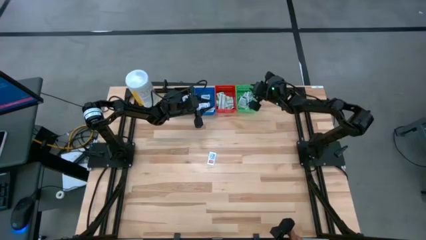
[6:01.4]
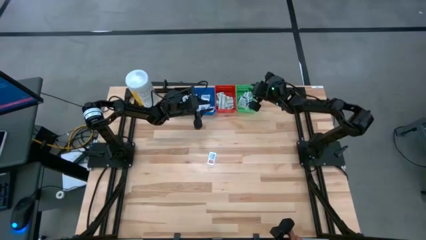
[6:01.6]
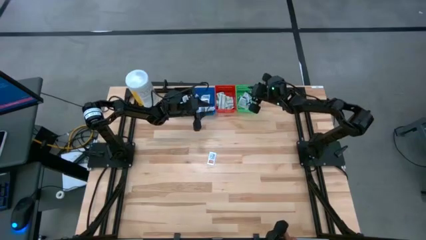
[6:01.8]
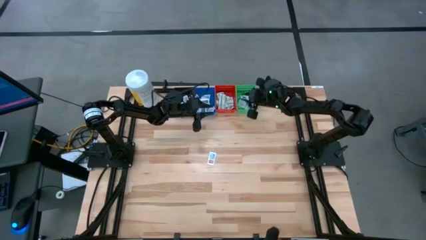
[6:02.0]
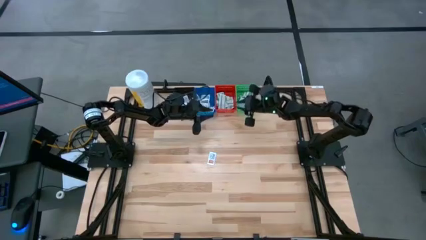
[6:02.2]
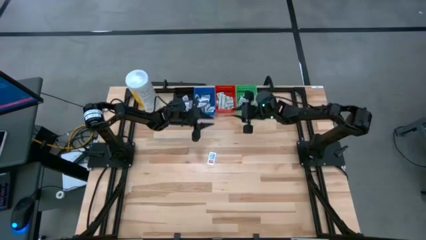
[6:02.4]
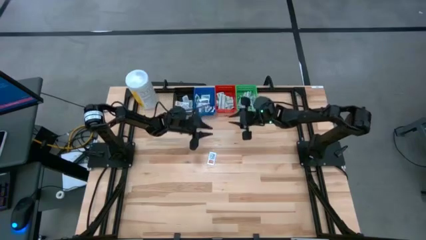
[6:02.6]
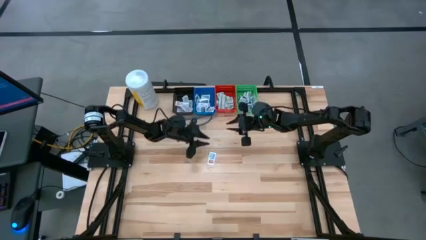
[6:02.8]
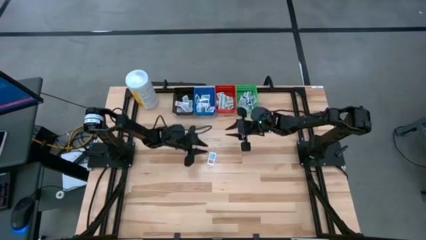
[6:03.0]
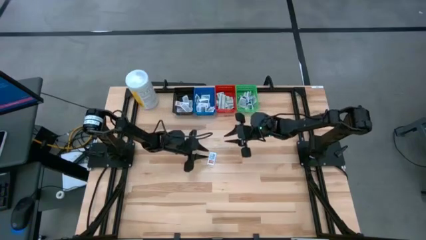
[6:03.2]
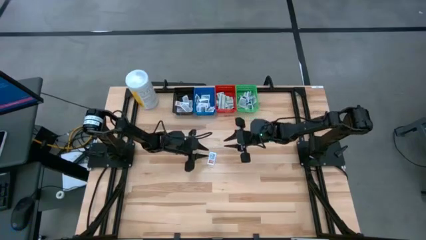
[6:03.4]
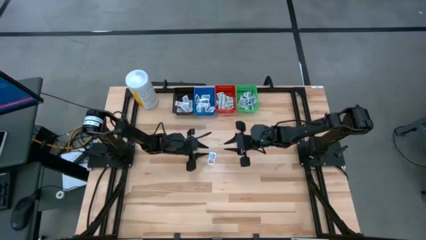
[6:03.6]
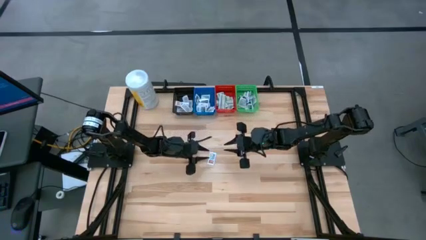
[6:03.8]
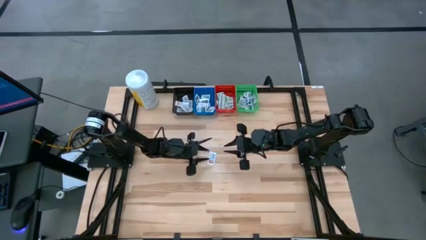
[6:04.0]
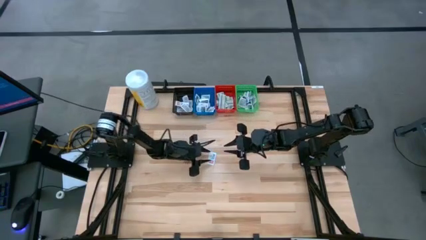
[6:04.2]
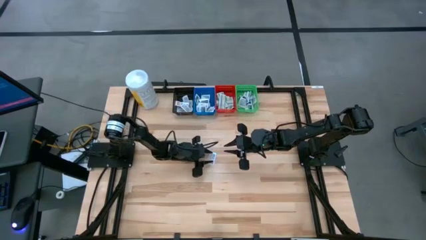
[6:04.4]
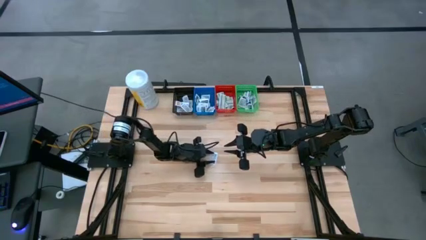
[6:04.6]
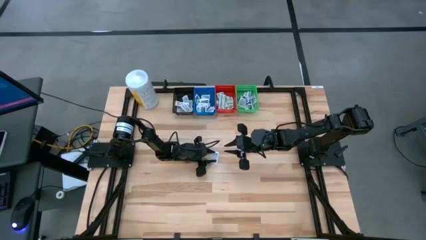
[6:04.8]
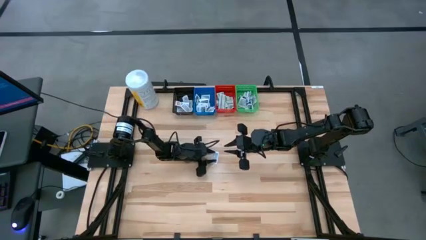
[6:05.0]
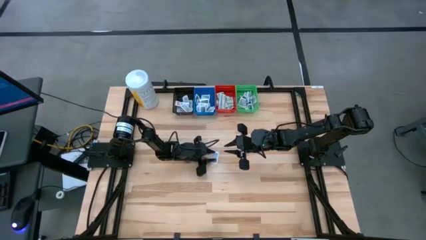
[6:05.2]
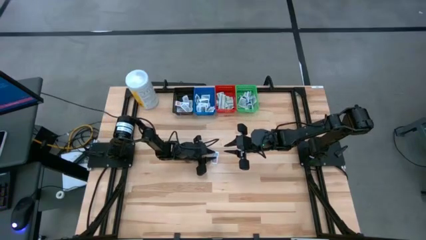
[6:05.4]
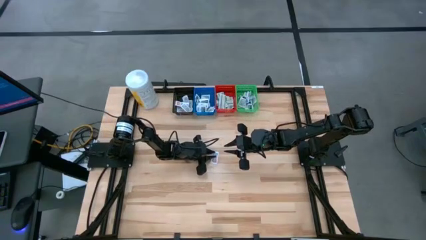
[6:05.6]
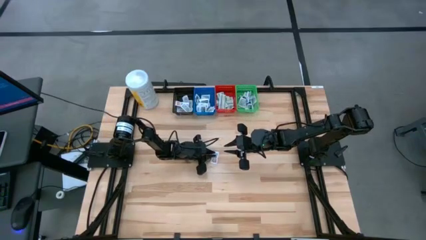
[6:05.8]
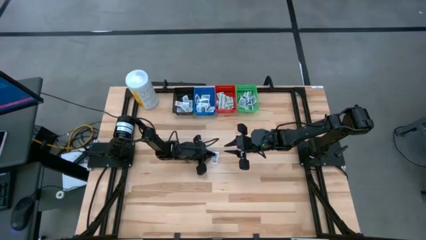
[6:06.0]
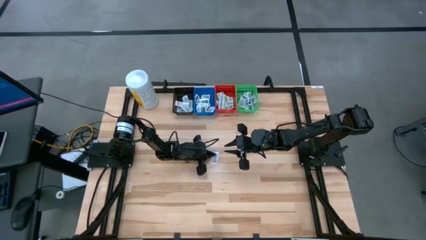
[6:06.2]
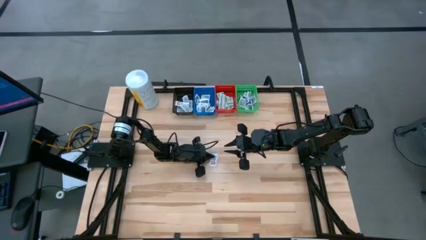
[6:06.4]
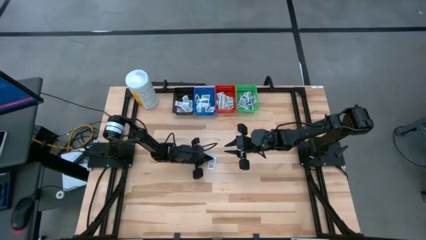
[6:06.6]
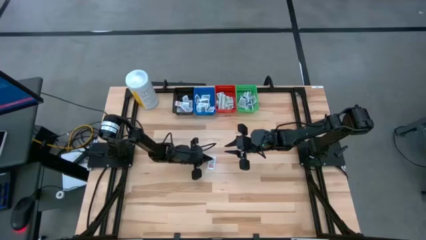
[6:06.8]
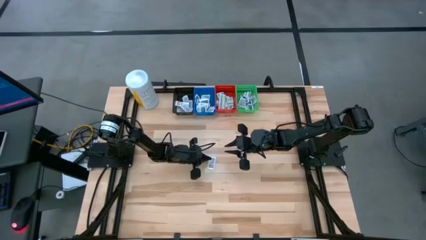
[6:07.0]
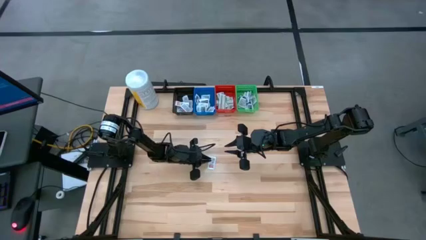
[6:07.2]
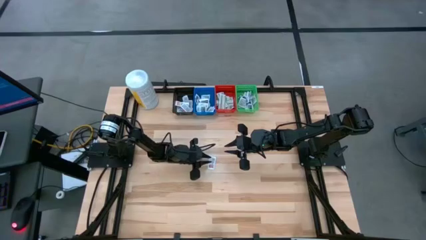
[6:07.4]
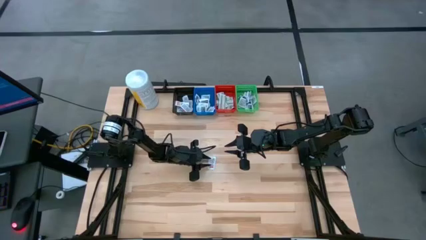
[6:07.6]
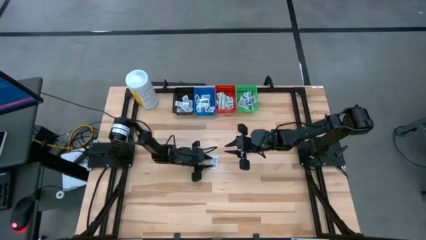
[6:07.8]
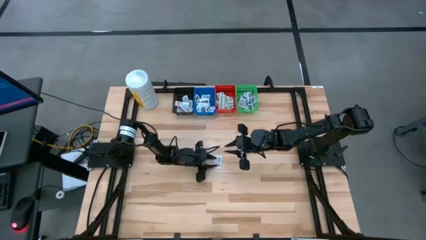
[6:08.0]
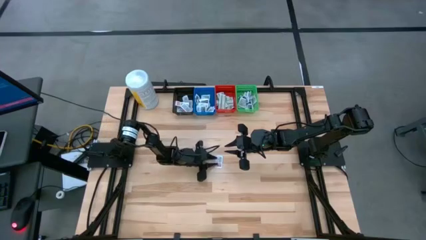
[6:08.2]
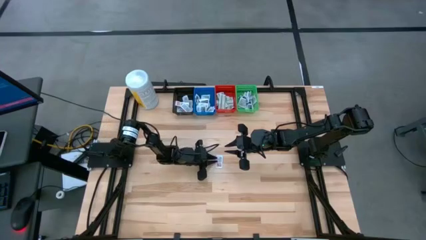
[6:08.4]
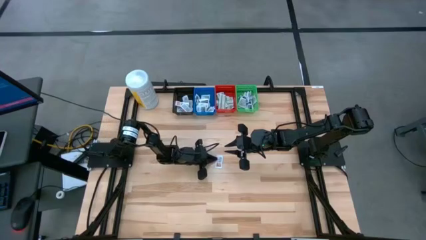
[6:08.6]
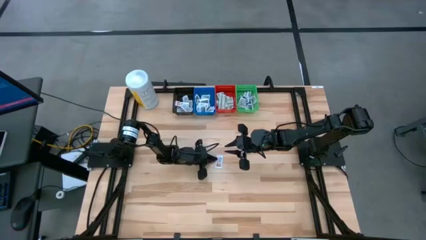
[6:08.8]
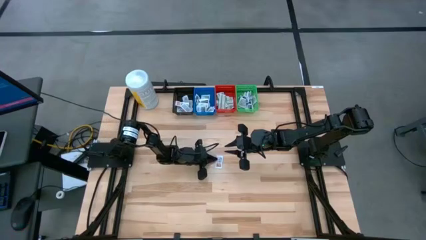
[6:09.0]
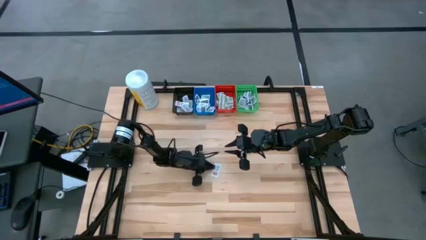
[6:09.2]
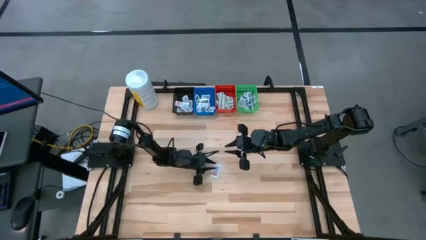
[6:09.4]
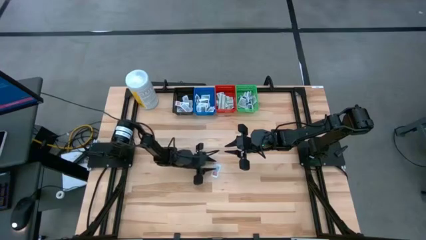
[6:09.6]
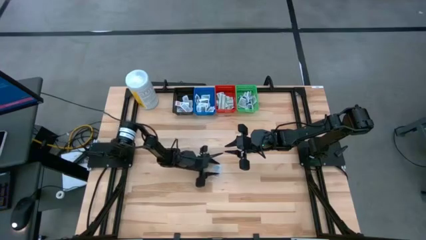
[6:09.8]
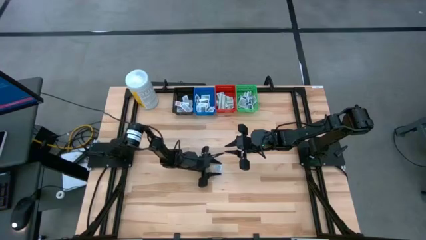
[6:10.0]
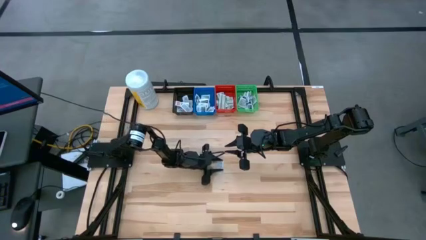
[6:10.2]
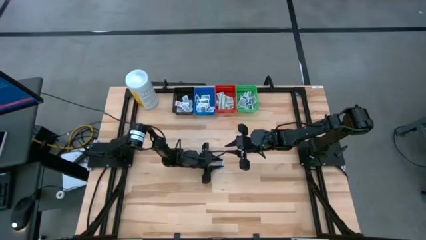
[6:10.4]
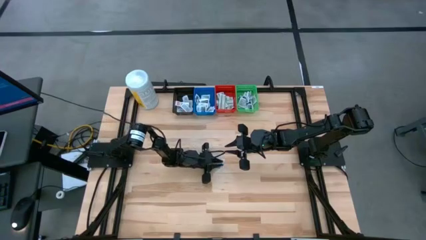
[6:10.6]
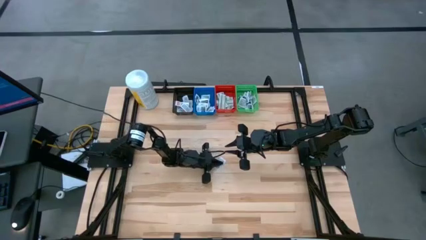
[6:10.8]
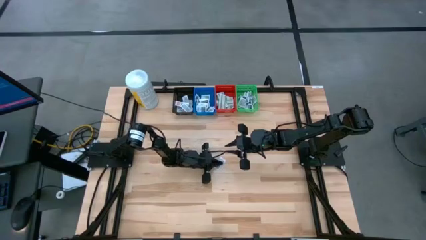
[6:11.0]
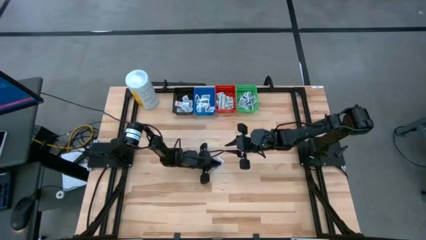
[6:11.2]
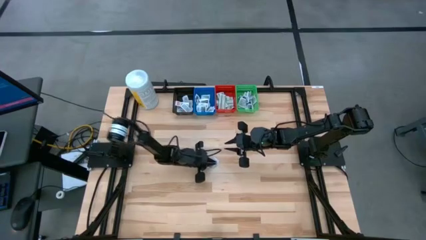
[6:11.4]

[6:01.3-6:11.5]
Task: Pick & Place First Aid Supplies
Put the orange ointment pack into the black bin

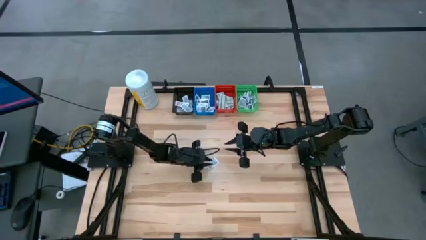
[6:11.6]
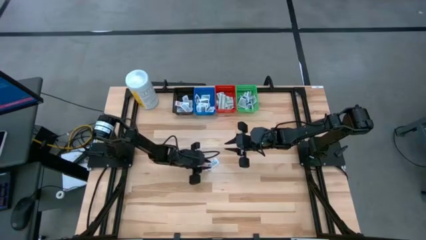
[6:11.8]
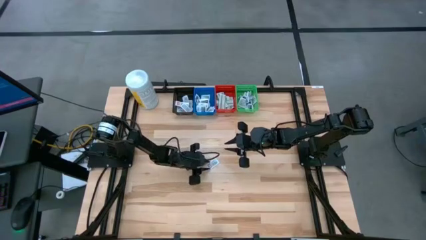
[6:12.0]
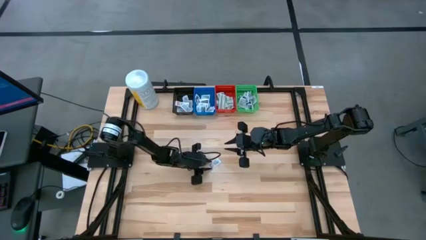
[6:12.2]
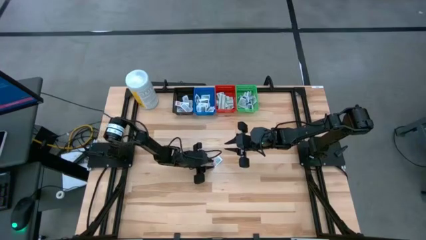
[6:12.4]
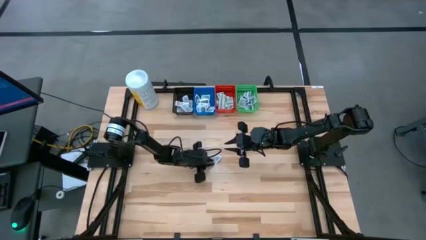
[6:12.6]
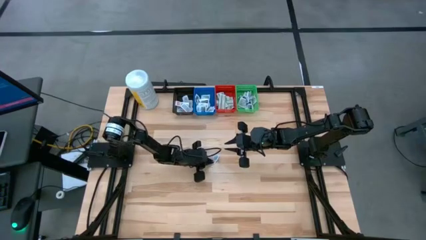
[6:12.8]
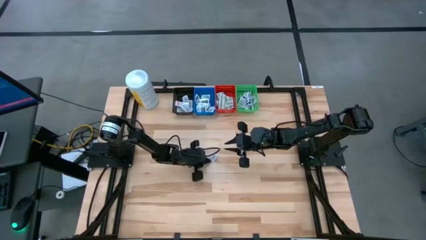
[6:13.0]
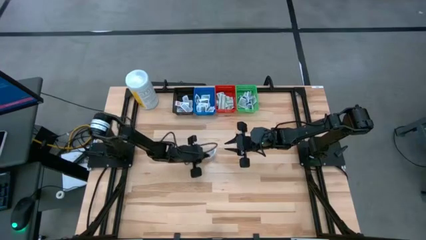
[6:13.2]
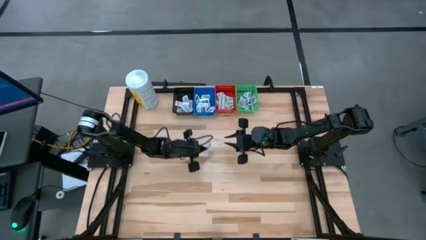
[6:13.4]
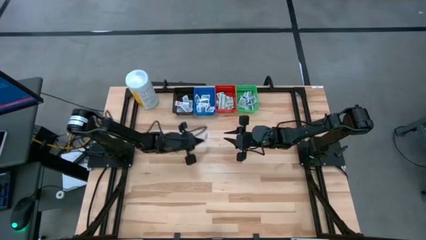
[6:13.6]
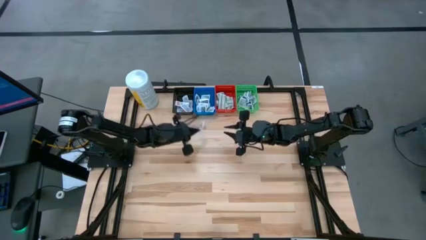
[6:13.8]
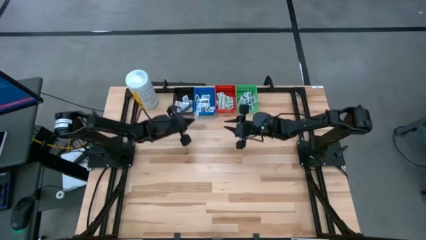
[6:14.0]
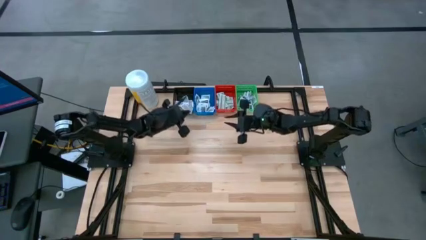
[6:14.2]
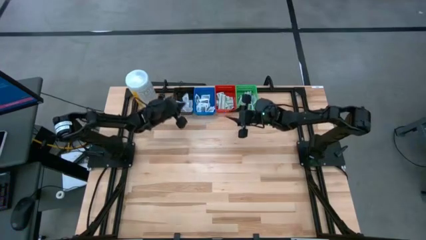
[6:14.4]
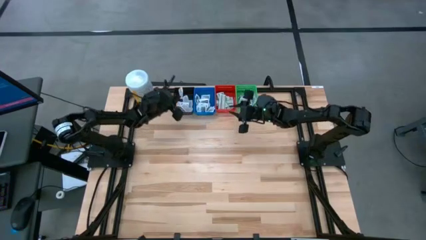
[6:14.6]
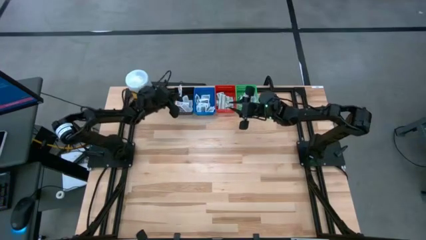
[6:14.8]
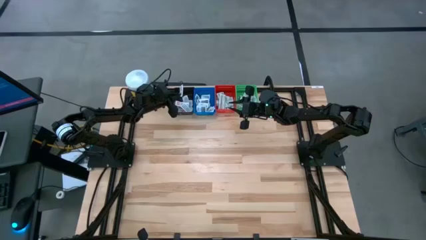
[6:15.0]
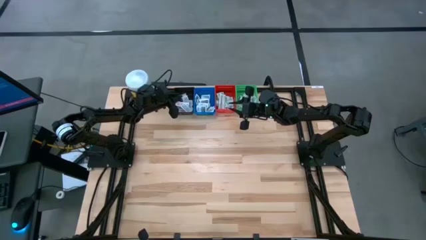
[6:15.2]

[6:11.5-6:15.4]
Put the orange ointment pack into the black bin
